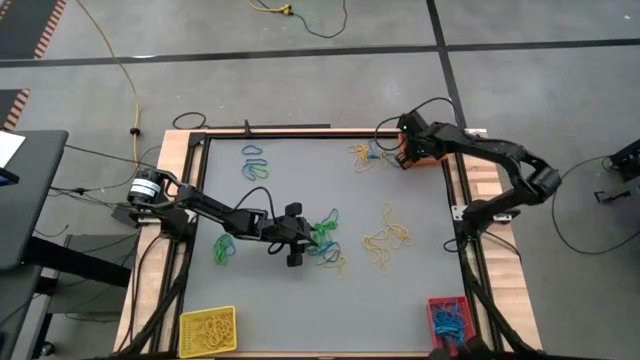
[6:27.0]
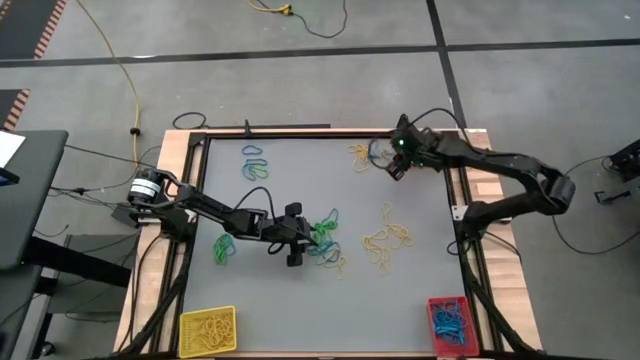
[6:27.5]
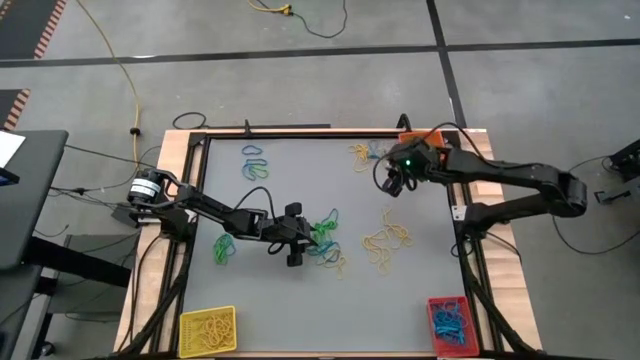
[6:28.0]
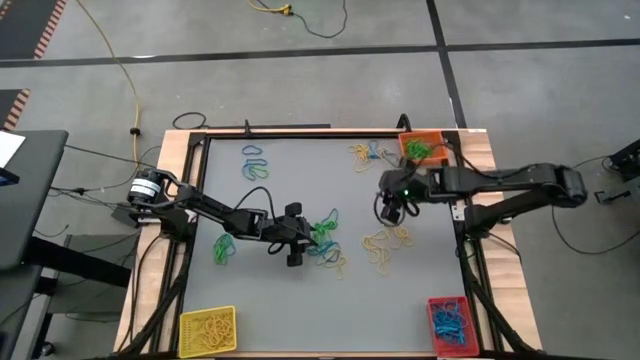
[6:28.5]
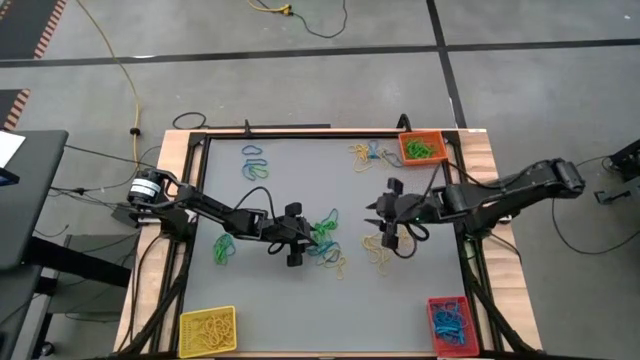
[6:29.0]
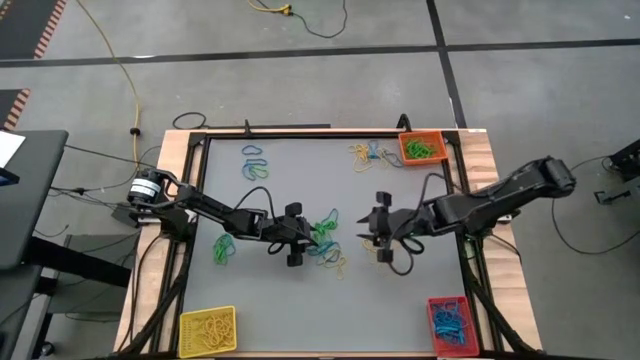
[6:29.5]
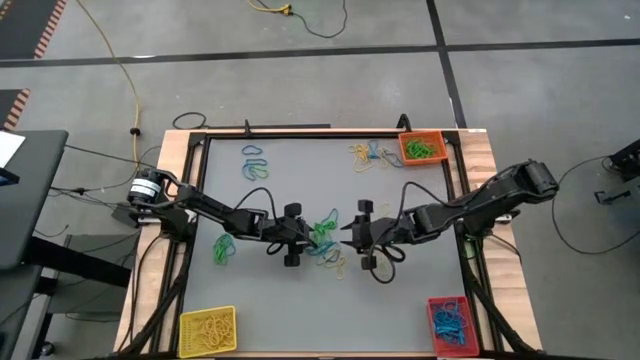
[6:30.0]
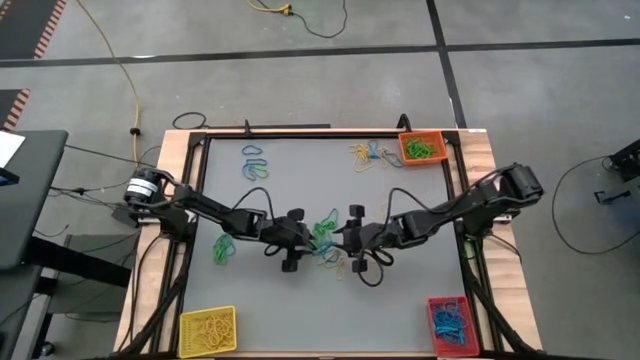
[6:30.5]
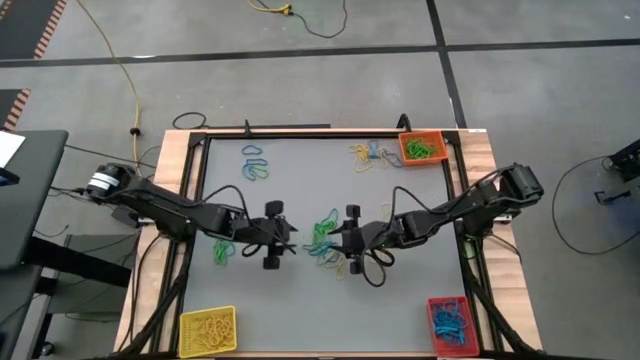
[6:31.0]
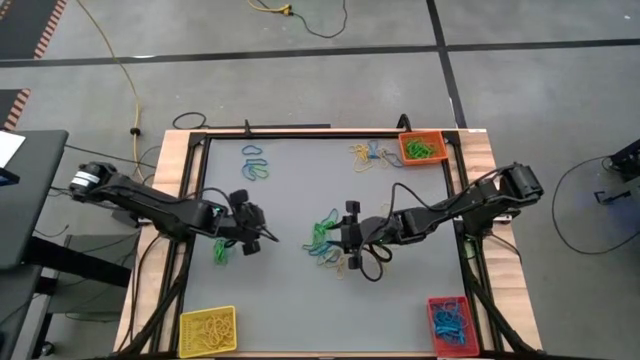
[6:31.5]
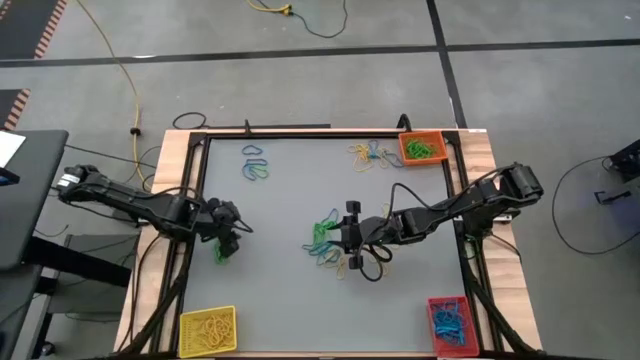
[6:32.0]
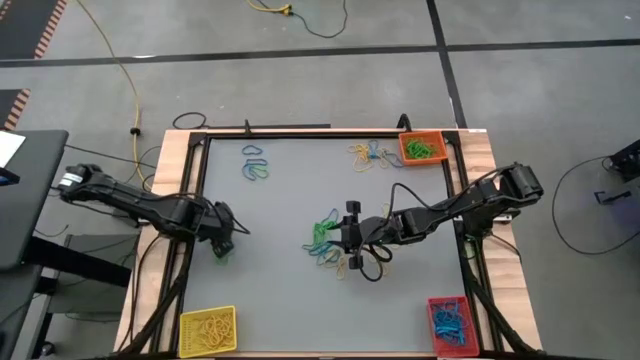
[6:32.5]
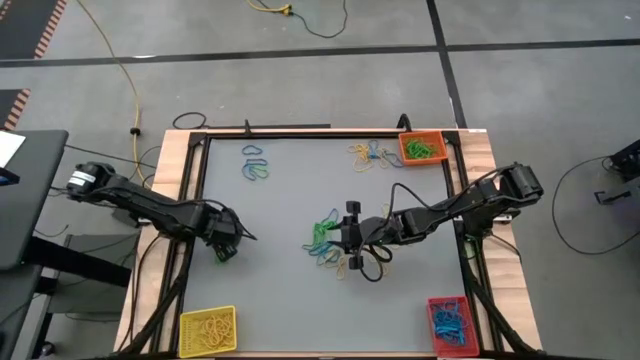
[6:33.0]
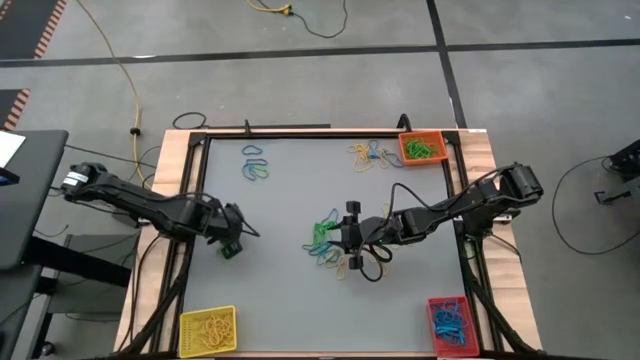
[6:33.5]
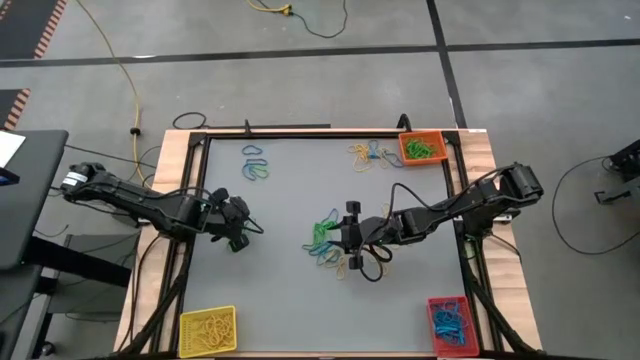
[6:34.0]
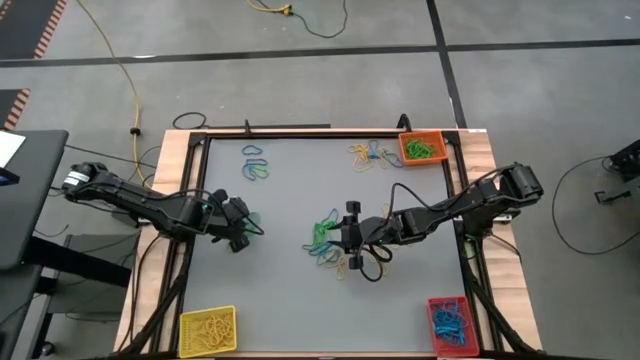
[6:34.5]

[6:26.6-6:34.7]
Task: Sort rubber bands into baskets
Put the green rubber band into the orange bin

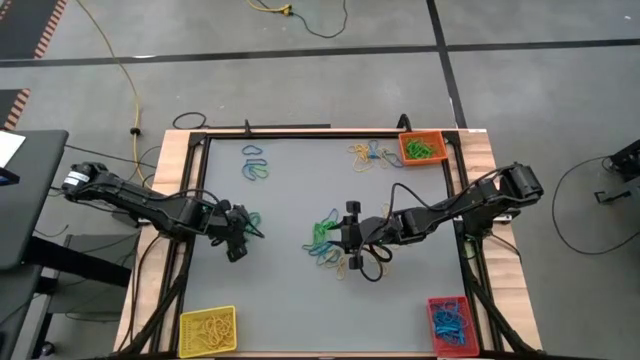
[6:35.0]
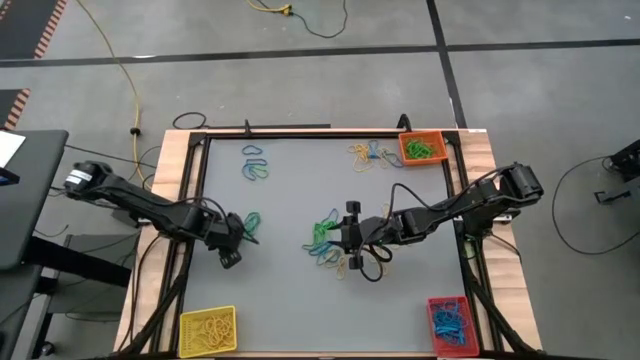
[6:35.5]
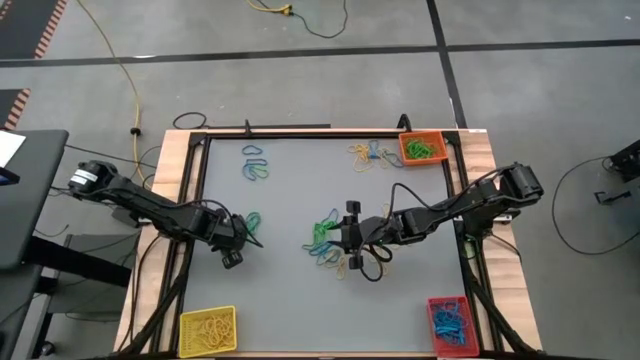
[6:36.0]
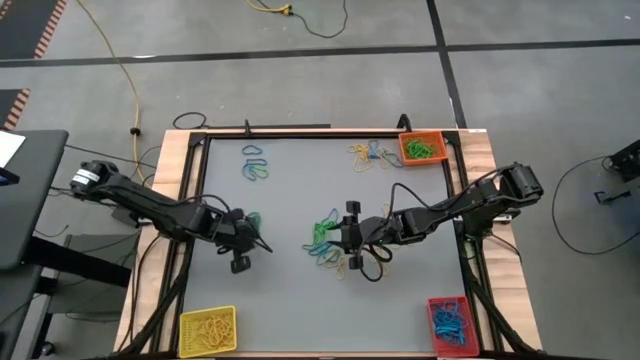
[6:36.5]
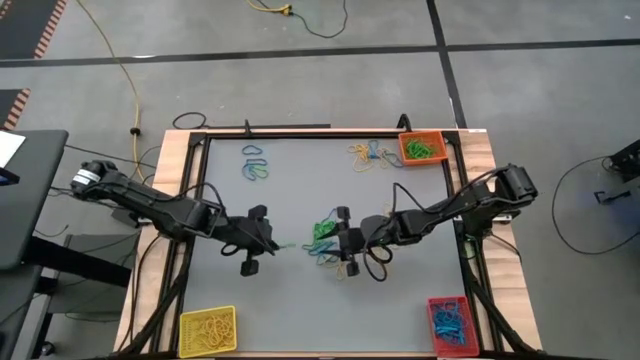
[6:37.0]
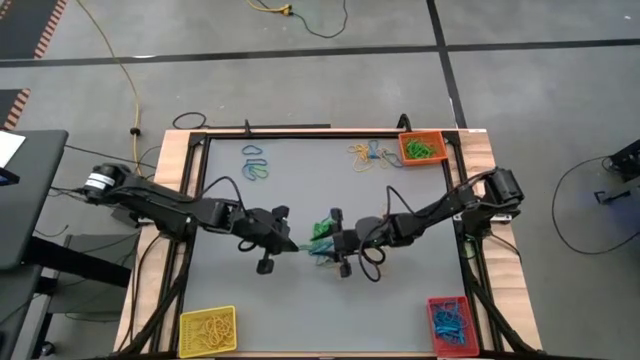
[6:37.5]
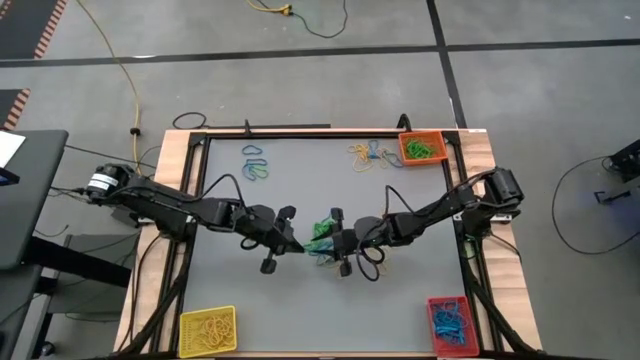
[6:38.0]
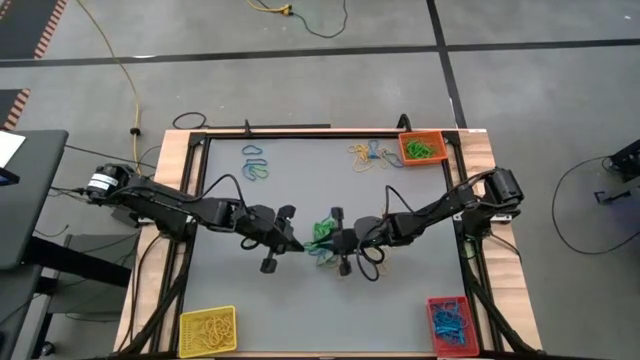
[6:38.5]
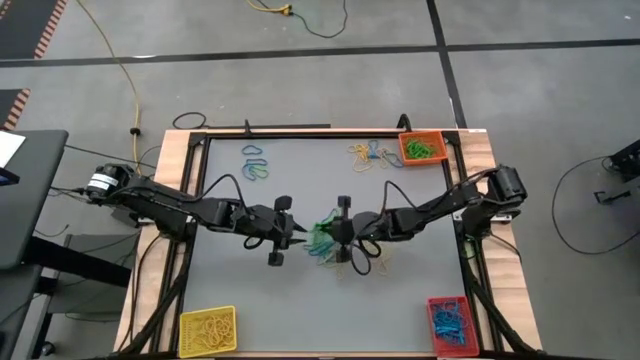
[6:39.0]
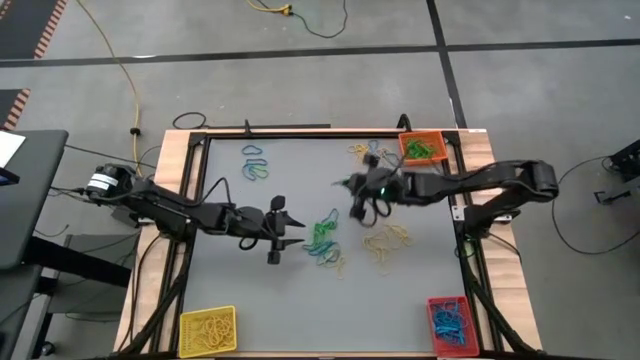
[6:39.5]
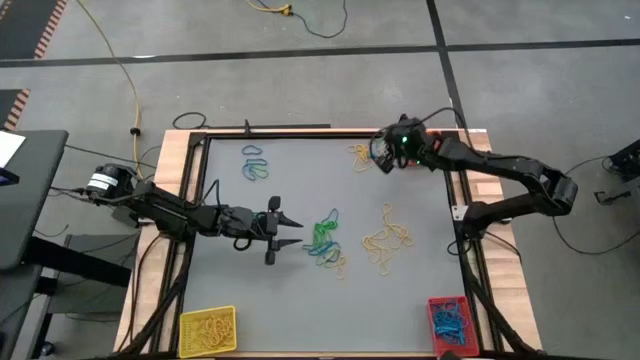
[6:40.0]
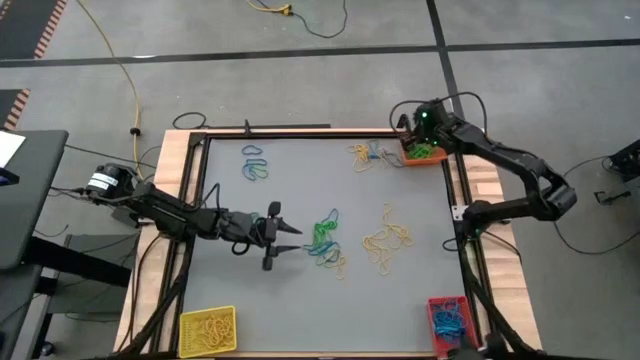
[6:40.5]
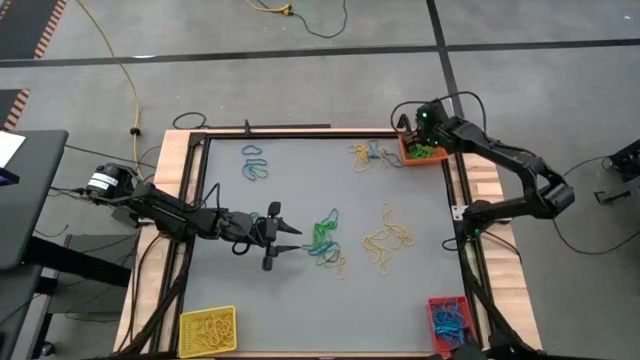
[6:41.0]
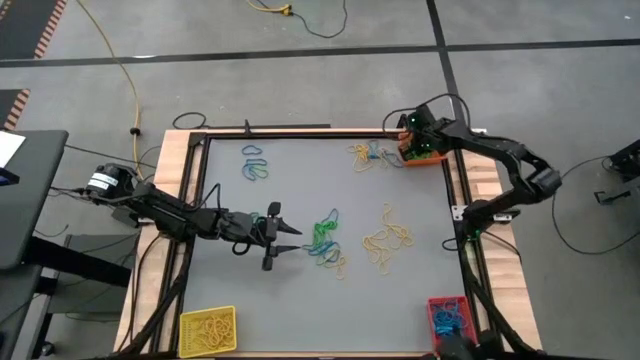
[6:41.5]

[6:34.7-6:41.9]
Put the green rubber band into the orange bin

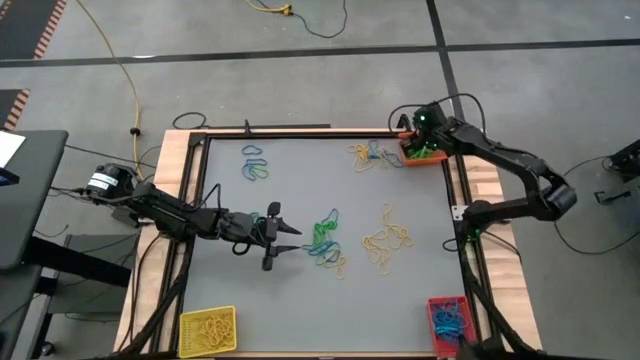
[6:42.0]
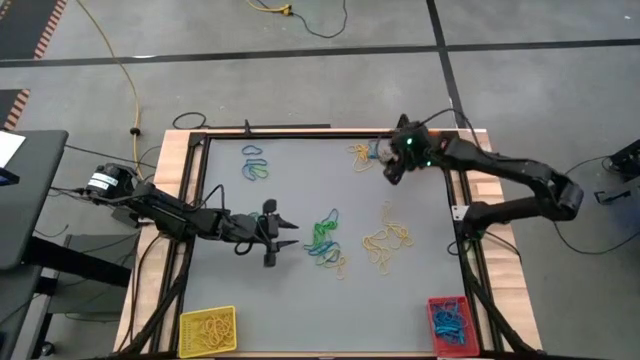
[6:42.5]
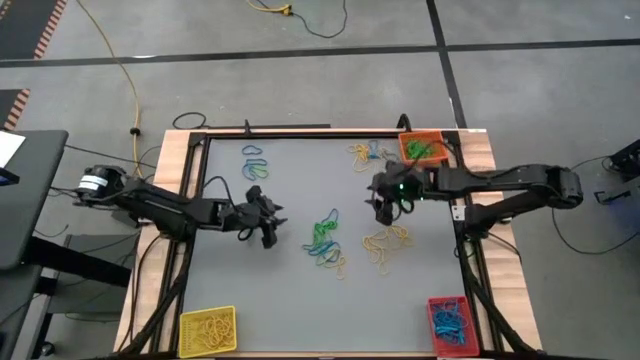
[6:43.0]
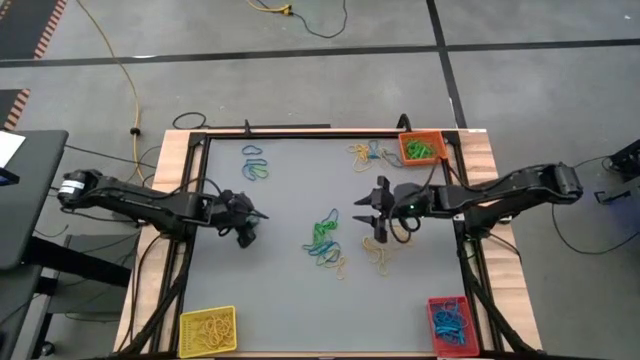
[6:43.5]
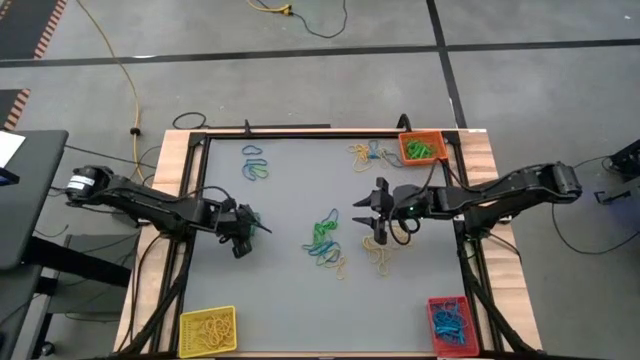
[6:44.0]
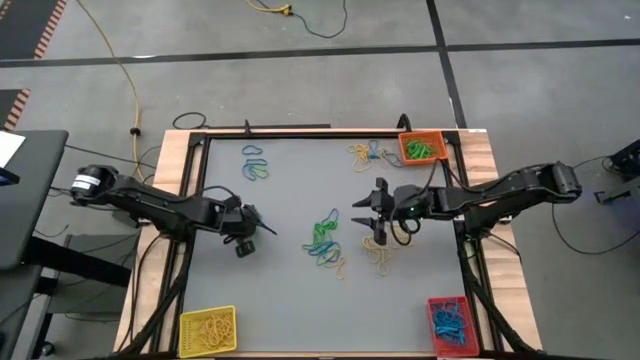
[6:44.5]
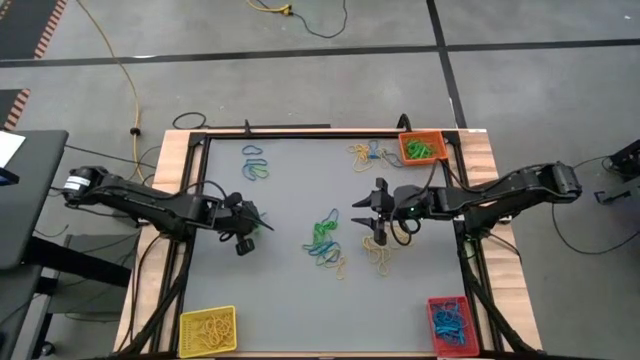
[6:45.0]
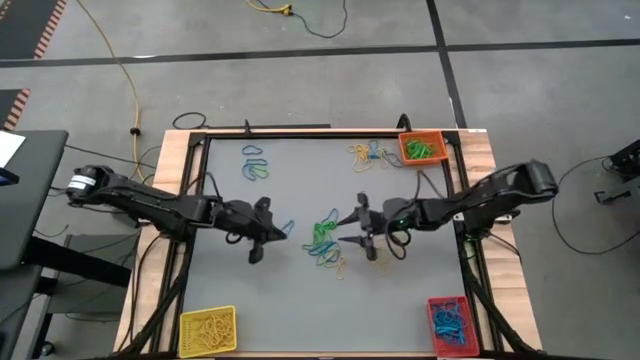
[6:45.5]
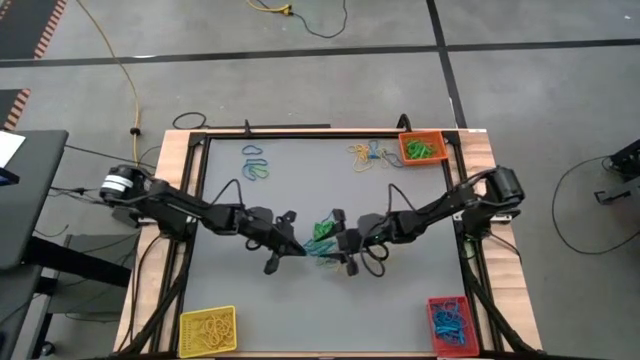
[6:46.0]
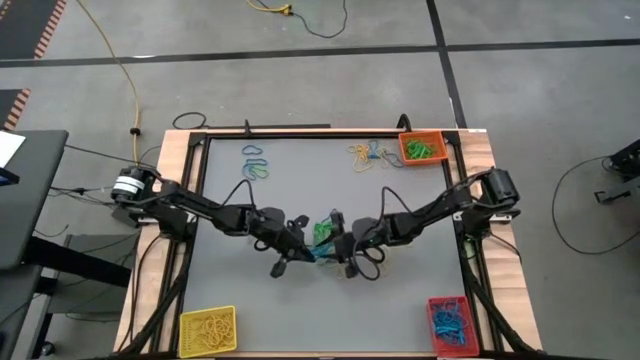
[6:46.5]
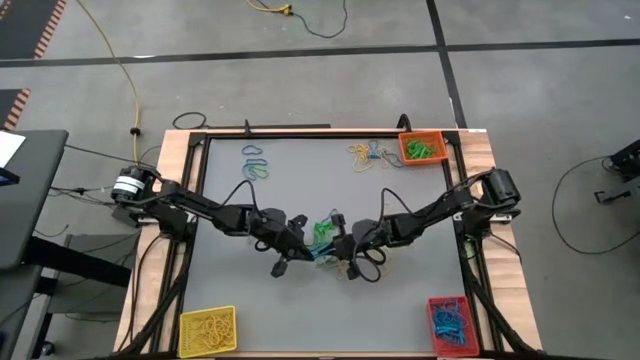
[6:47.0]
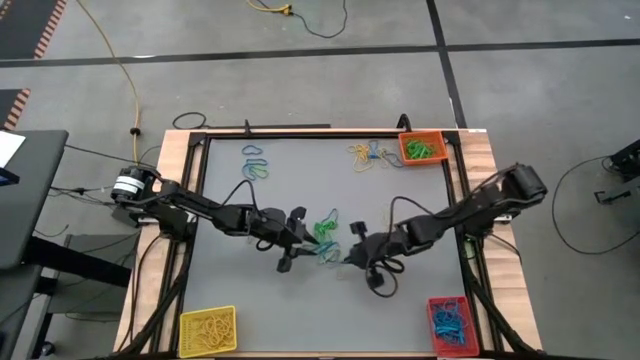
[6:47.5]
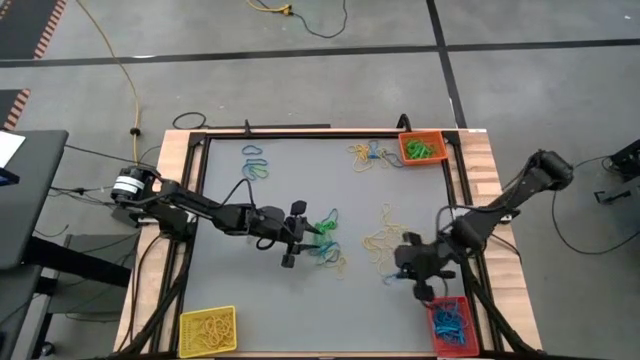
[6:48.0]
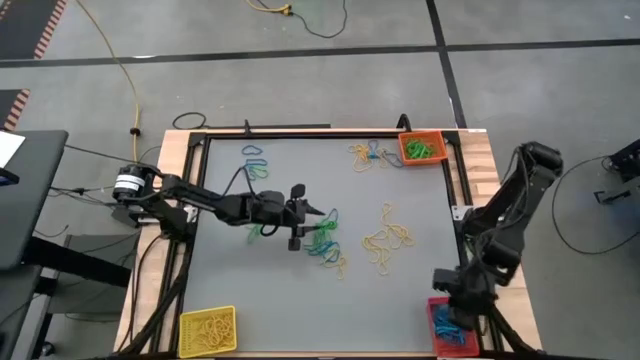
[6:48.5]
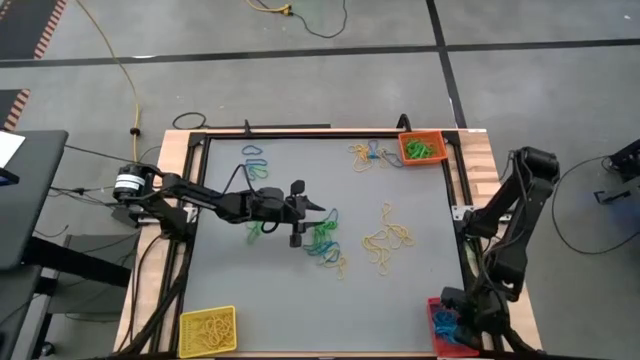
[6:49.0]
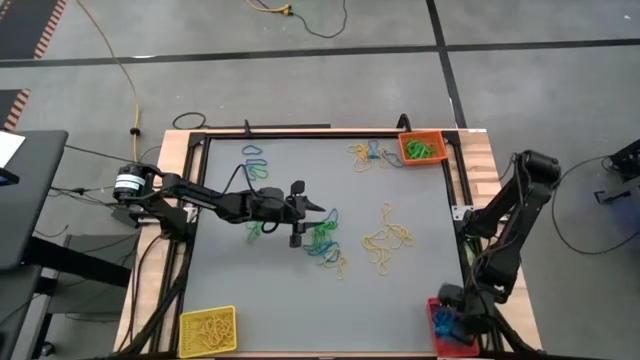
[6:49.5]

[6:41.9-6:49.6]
Put the blue rubber band into the red bin
